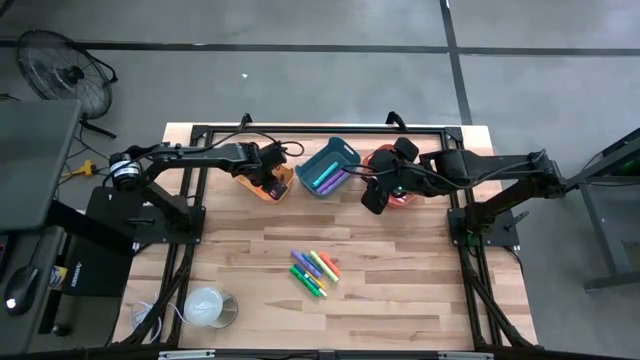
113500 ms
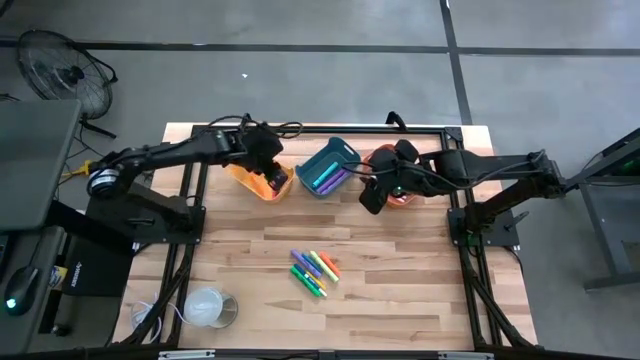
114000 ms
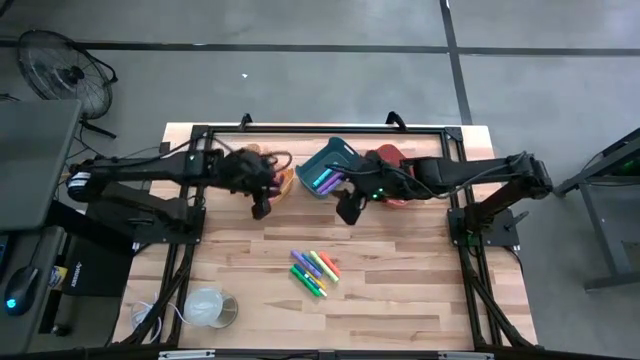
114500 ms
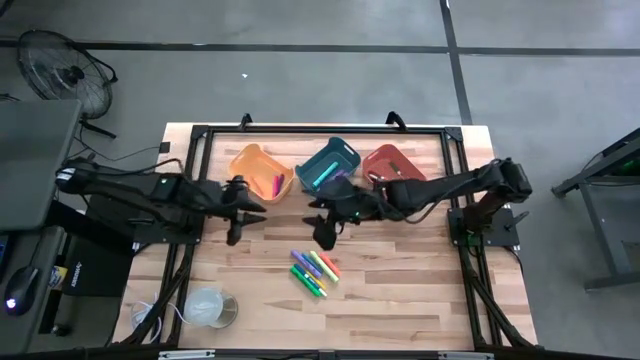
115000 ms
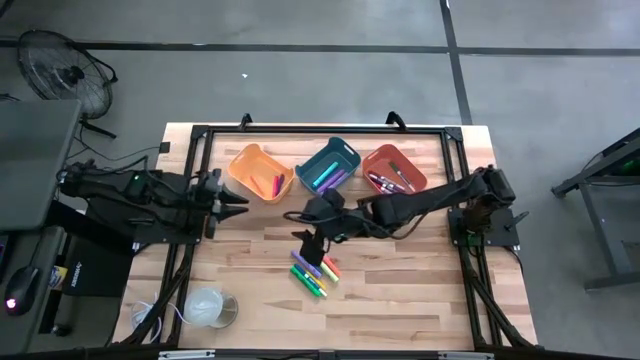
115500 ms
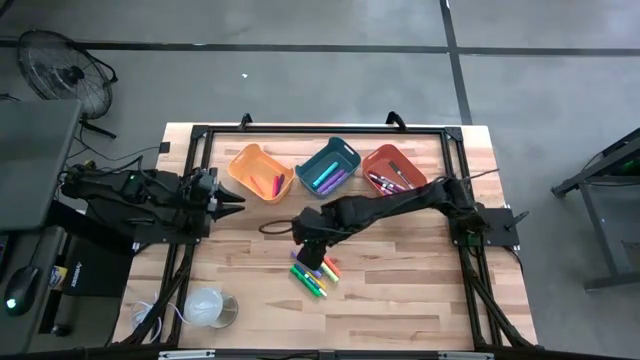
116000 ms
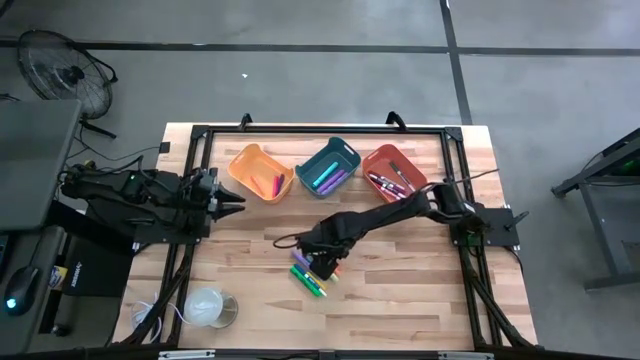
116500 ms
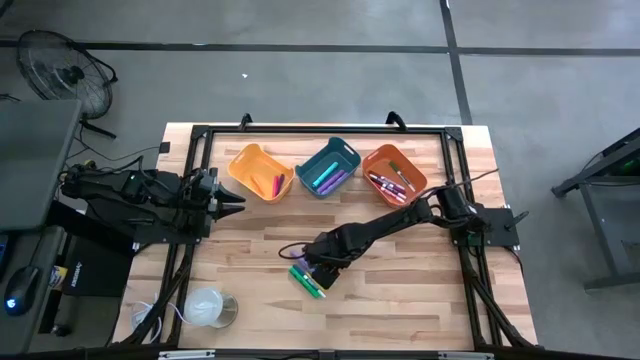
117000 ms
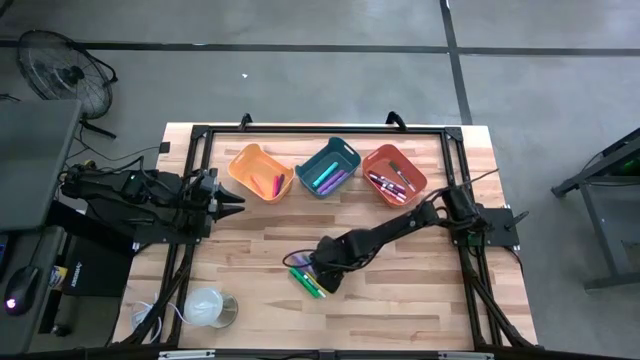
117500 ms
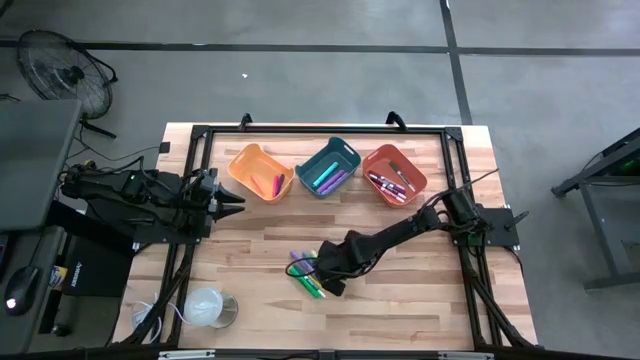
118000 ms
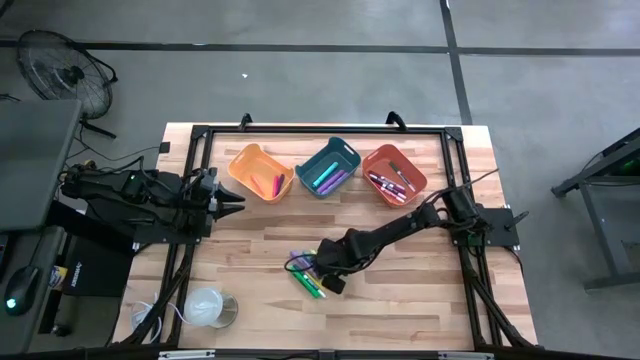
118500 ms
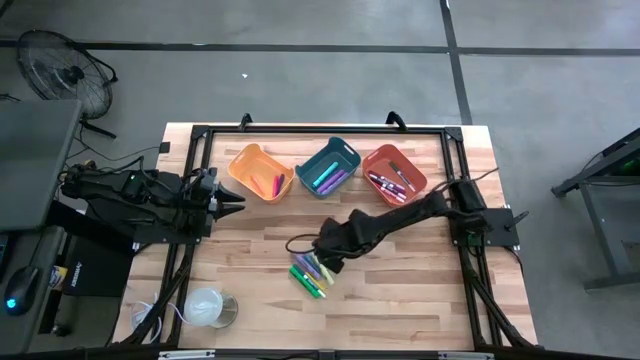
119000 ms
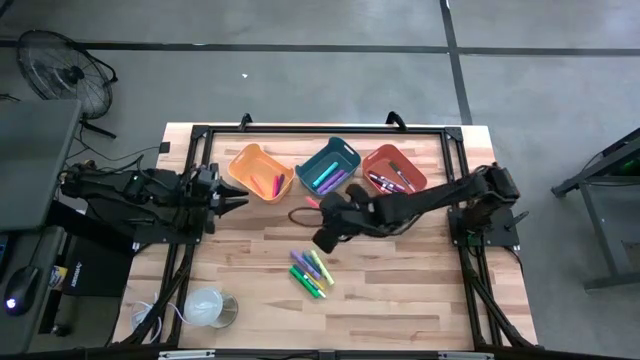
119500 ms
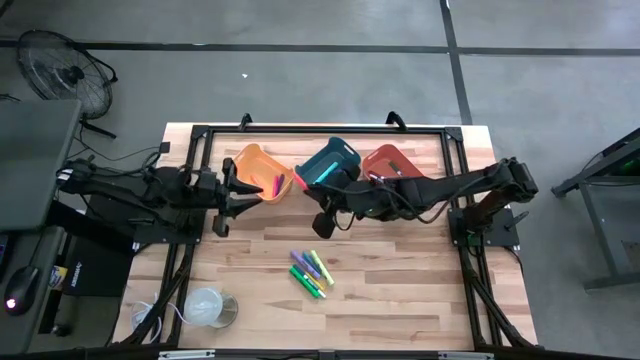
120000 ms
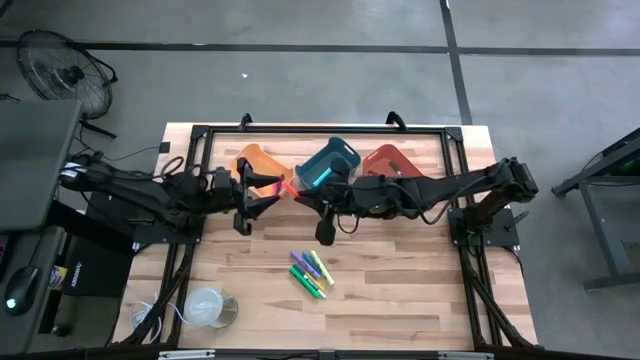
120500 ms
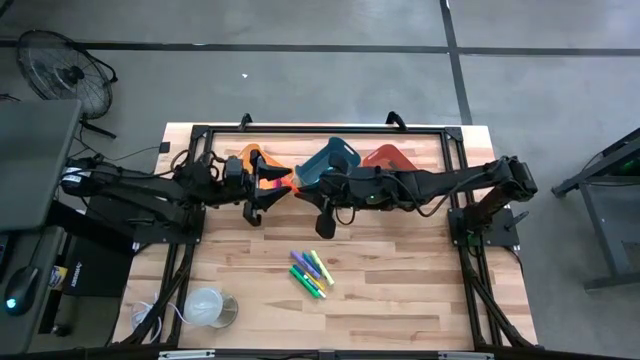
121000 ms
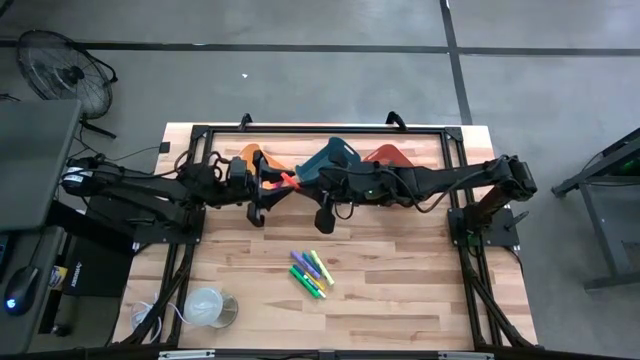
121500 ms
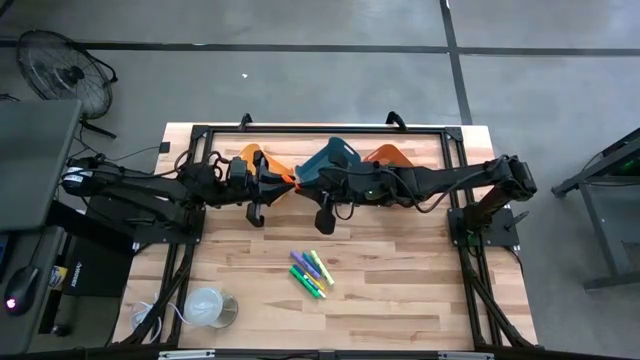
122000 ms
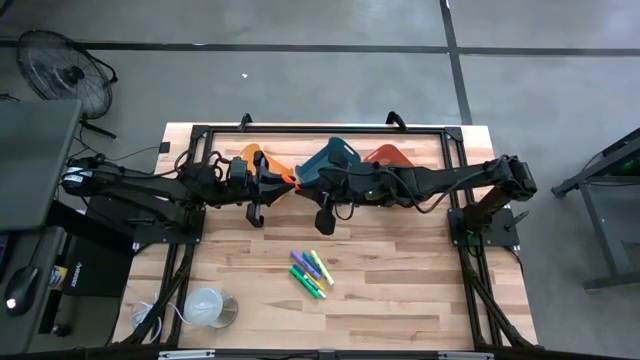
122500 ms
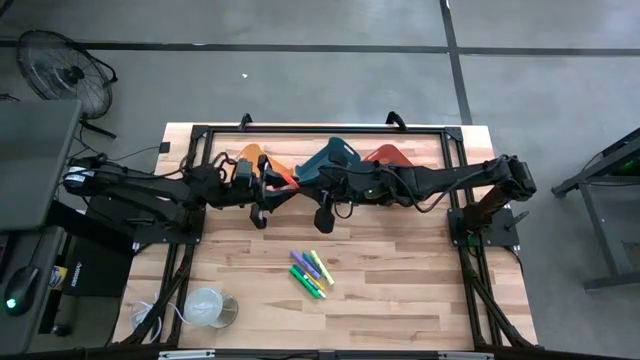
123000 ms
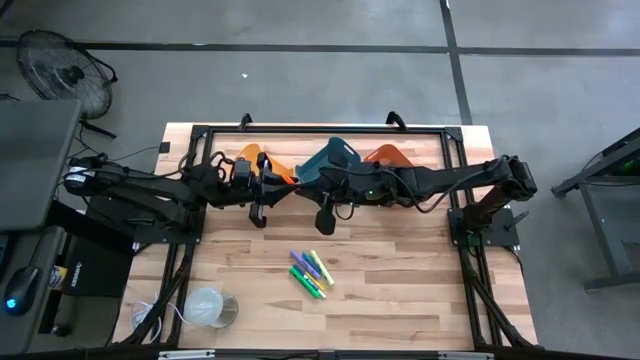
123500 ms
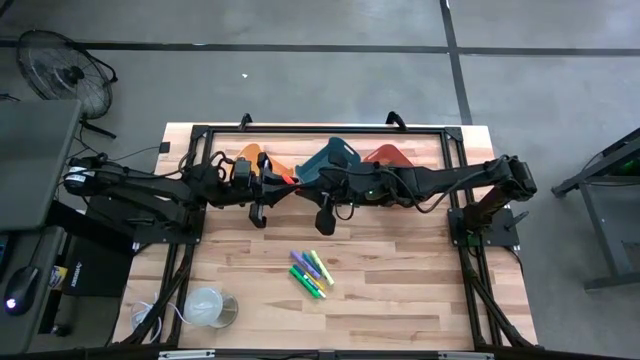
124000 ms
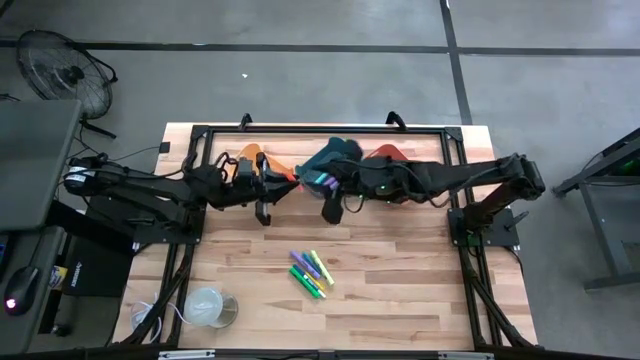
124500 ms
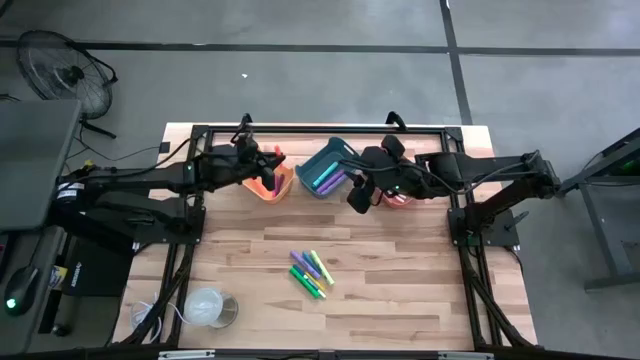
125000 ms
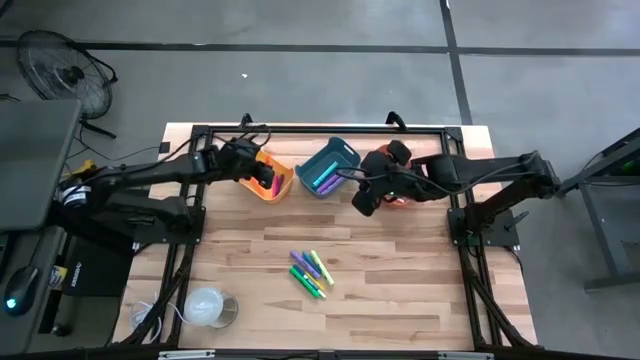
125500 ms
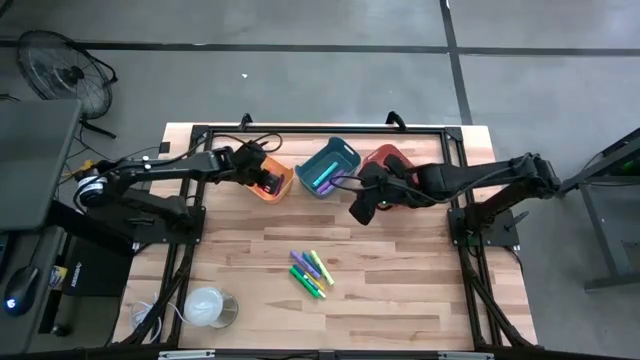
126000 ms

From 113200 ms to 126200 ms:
Task: Pick & Place Markers
Put the orange pen into the yellow bin

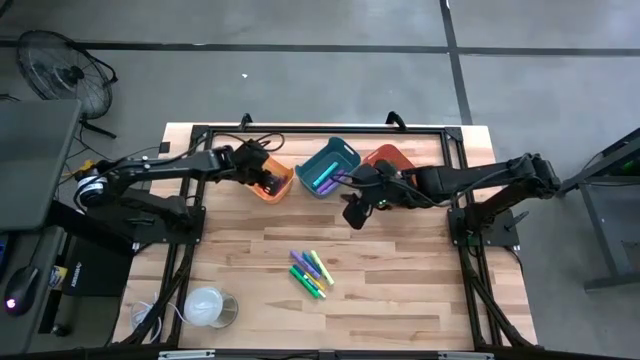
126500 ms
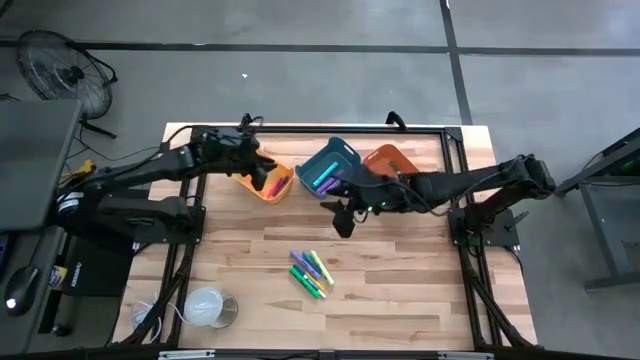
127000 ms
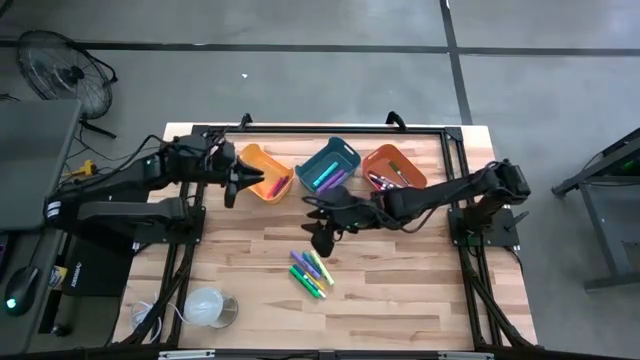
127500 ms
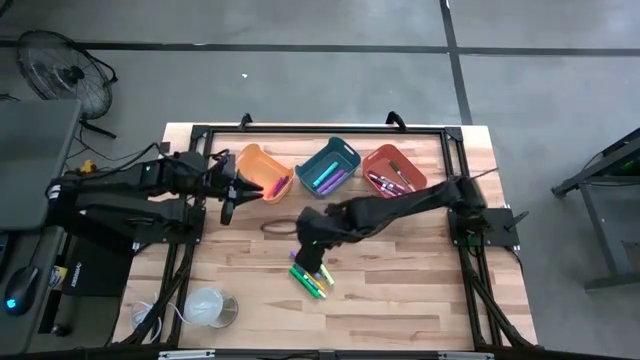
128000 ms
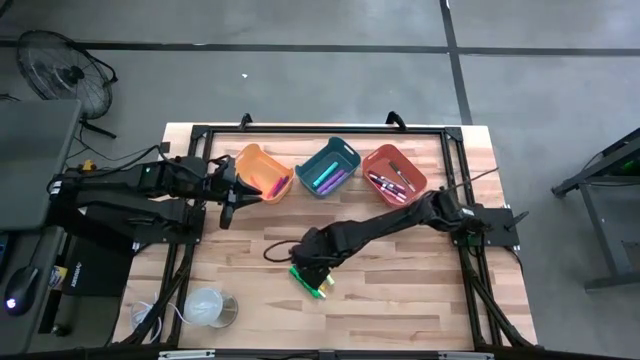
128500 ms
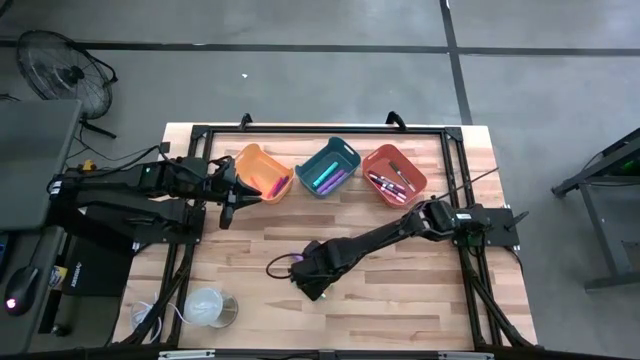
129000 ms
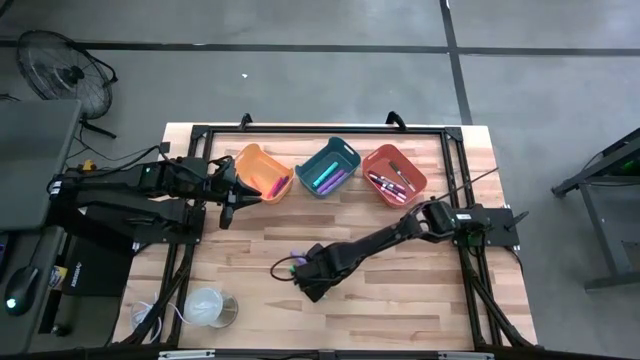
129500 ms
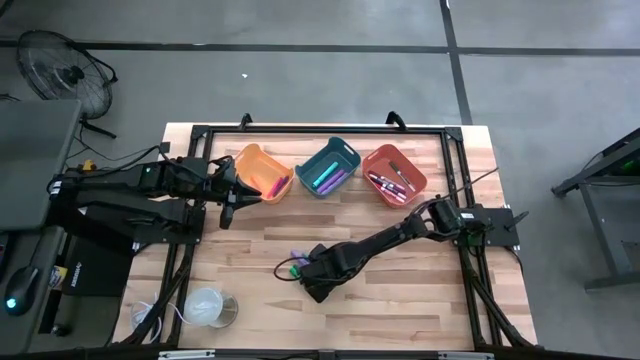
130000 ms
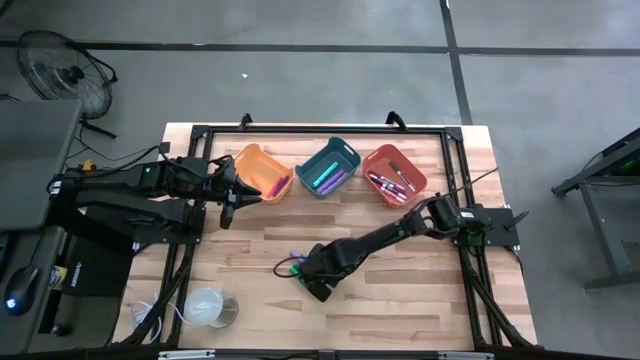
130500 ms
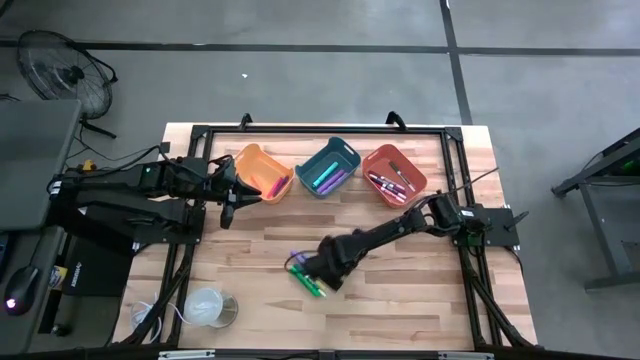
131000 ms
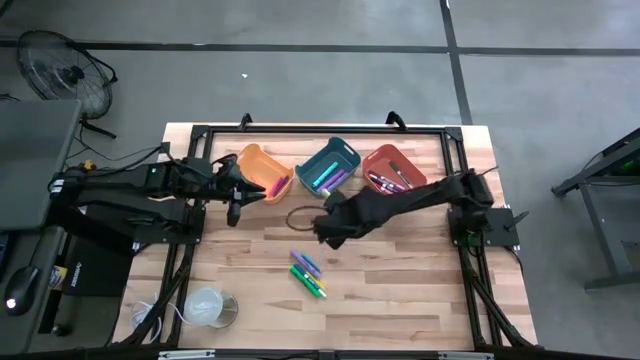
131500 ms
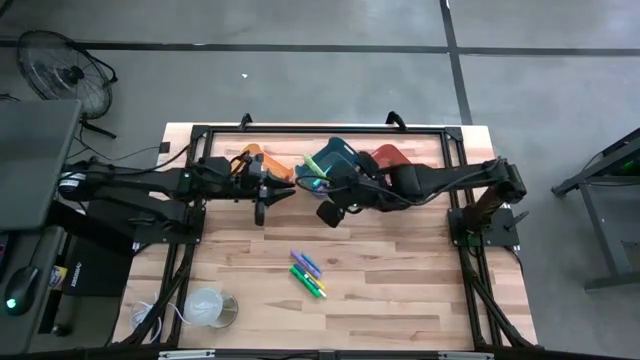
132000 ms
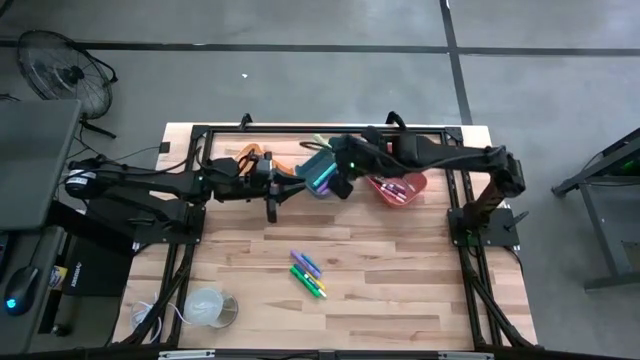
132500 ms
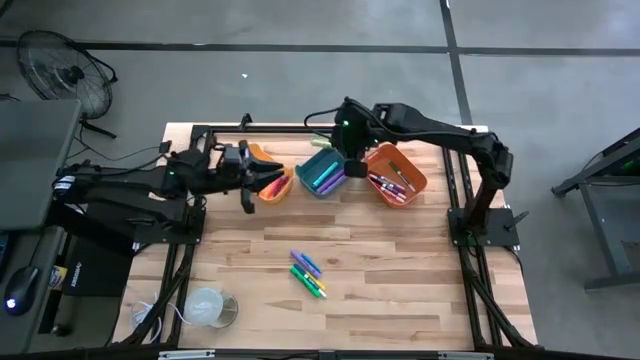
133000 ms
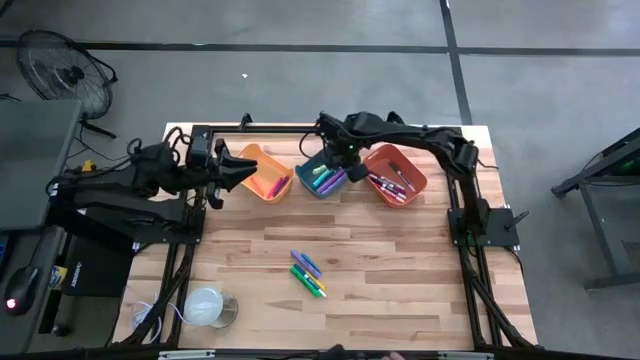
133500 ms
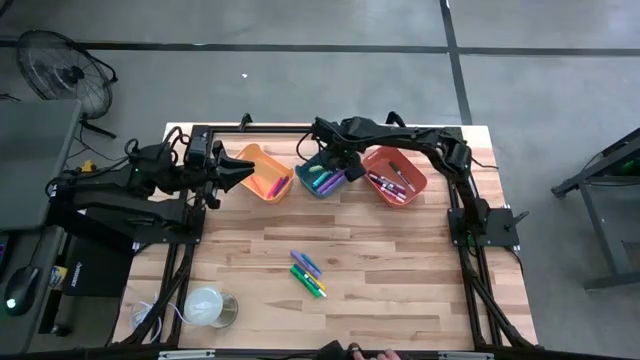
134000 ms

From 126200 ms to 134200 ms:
Put the light green highlighter pen into the blue bin
